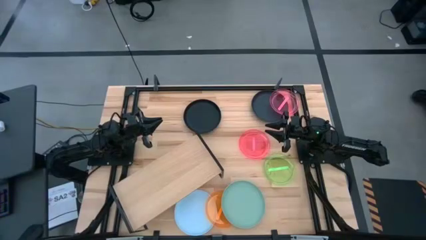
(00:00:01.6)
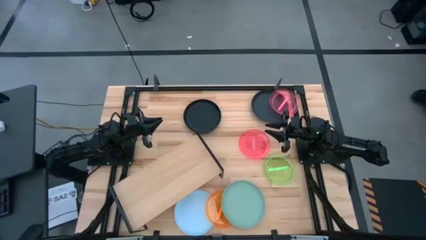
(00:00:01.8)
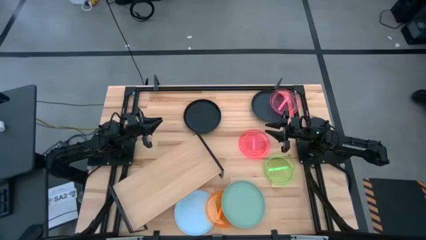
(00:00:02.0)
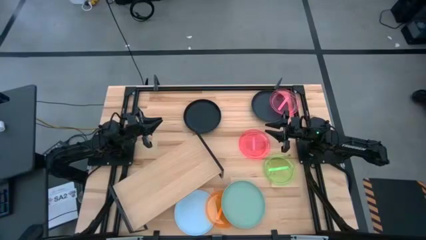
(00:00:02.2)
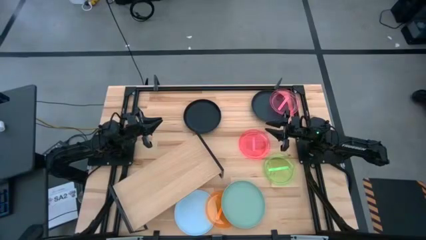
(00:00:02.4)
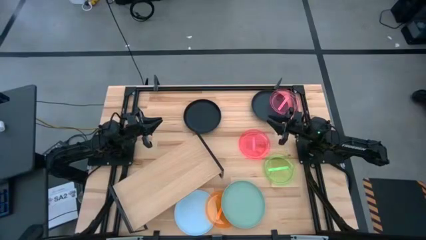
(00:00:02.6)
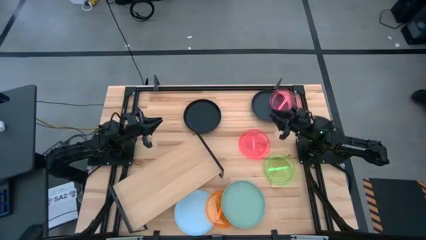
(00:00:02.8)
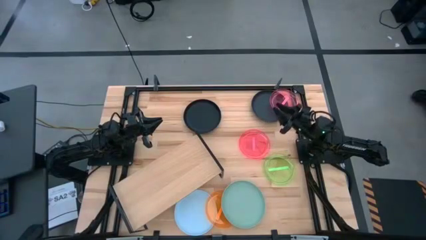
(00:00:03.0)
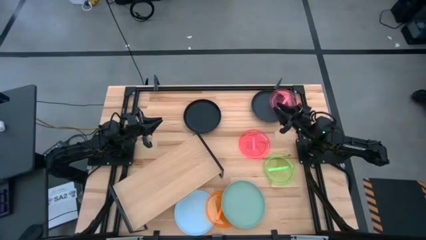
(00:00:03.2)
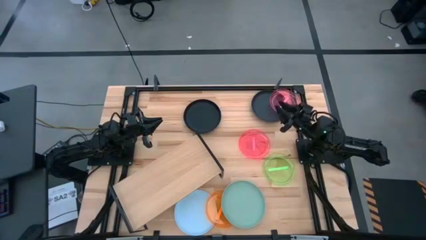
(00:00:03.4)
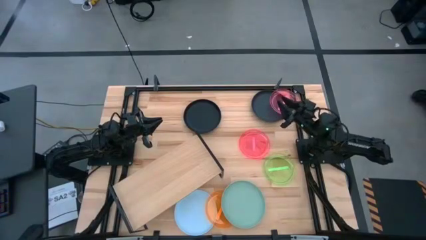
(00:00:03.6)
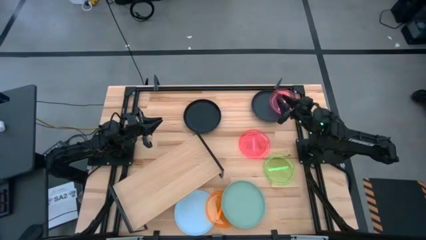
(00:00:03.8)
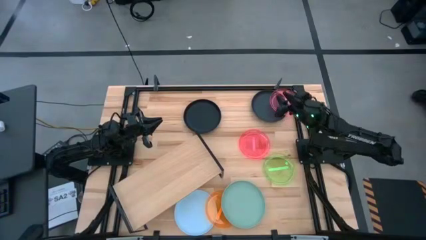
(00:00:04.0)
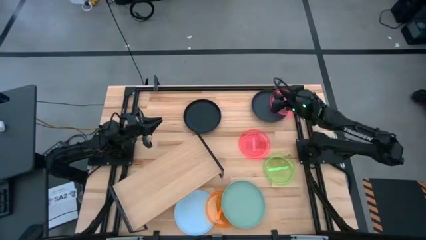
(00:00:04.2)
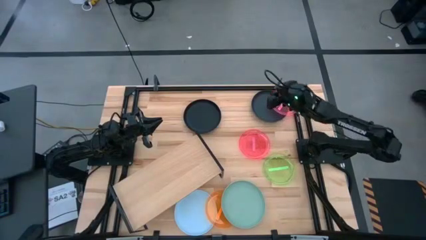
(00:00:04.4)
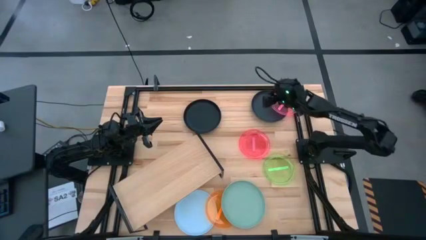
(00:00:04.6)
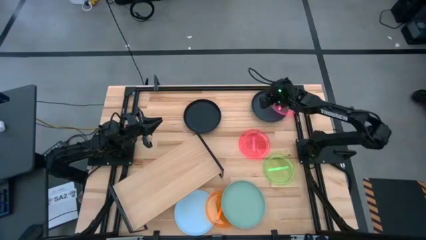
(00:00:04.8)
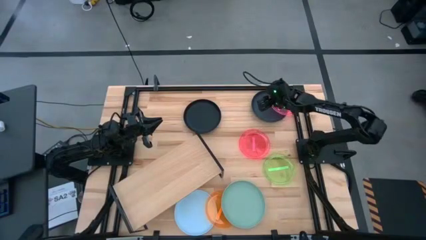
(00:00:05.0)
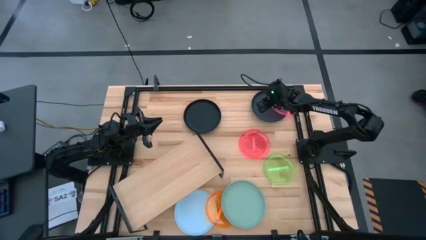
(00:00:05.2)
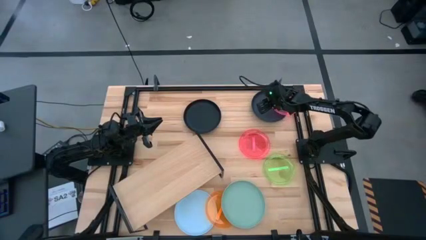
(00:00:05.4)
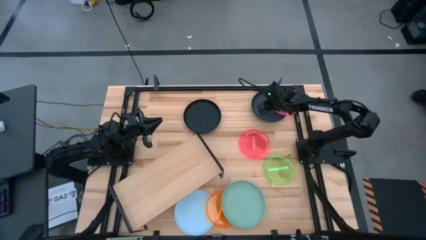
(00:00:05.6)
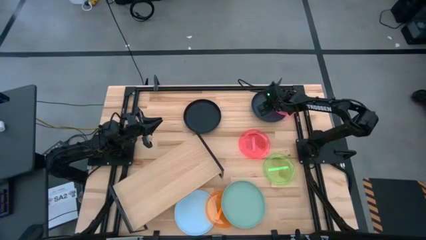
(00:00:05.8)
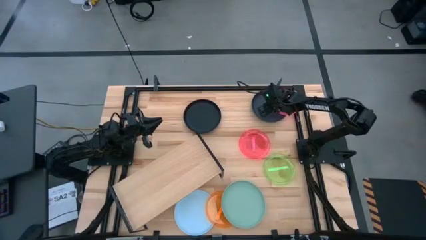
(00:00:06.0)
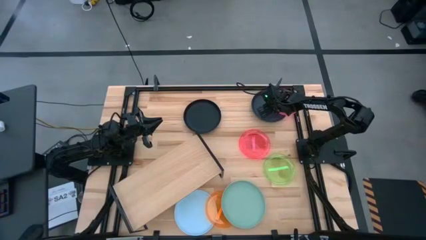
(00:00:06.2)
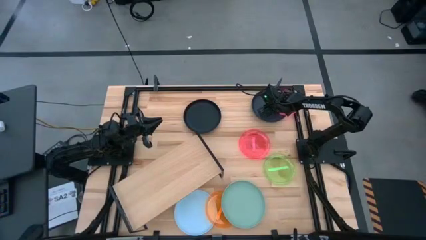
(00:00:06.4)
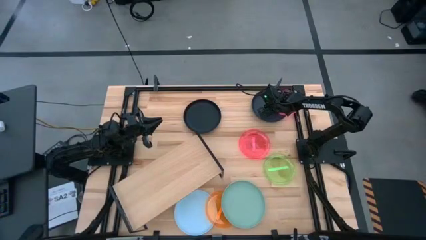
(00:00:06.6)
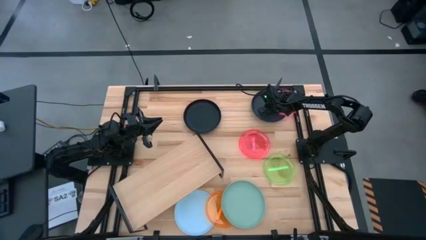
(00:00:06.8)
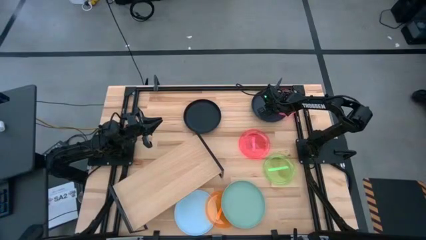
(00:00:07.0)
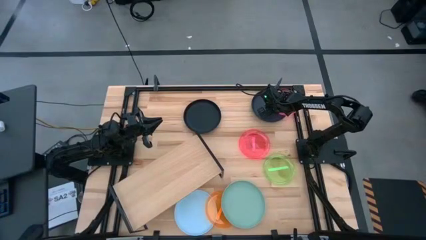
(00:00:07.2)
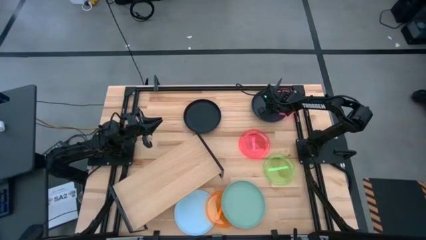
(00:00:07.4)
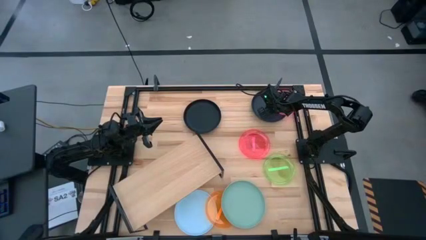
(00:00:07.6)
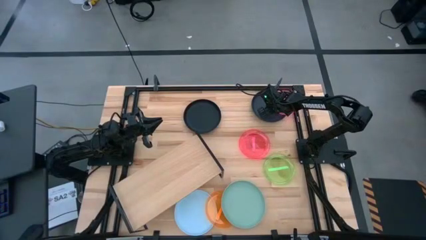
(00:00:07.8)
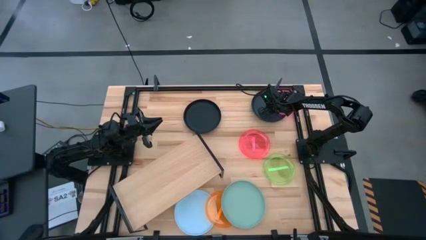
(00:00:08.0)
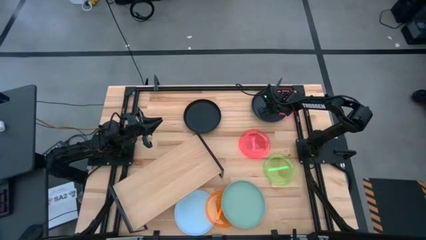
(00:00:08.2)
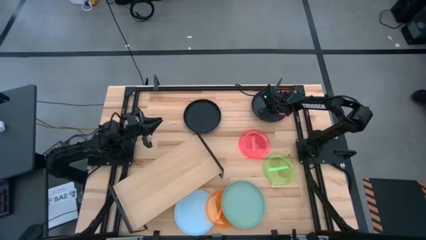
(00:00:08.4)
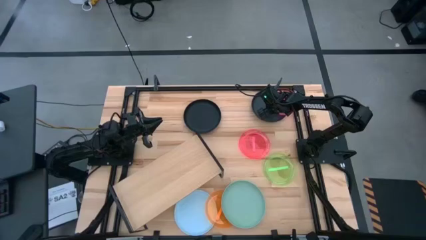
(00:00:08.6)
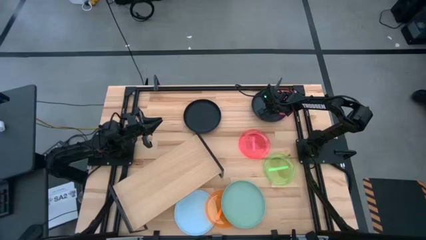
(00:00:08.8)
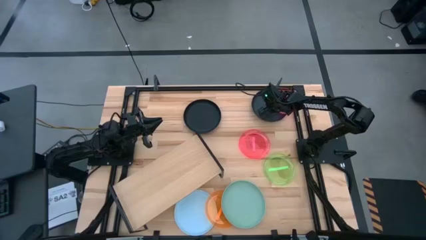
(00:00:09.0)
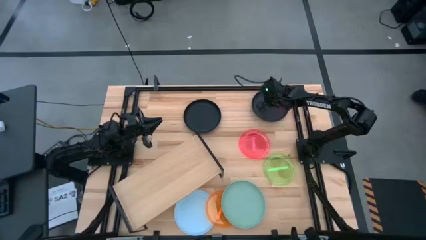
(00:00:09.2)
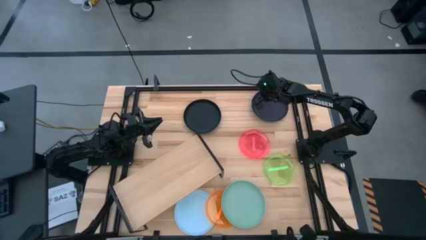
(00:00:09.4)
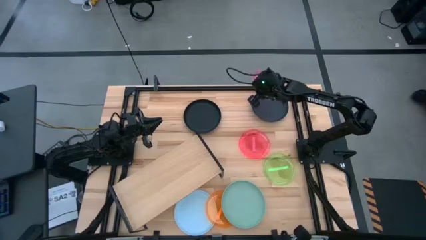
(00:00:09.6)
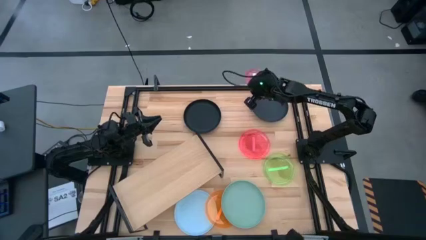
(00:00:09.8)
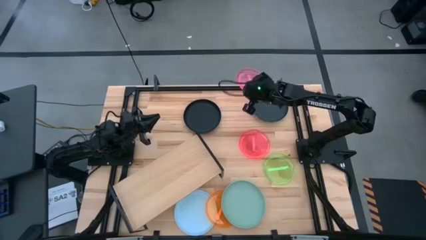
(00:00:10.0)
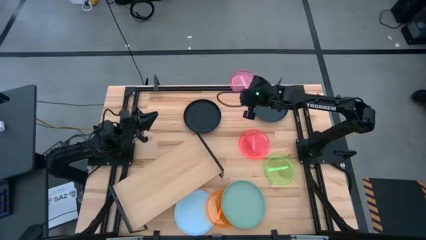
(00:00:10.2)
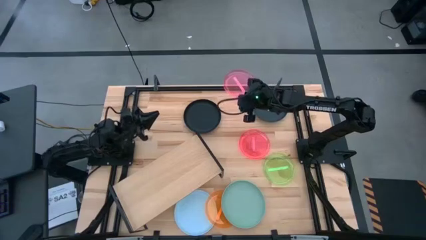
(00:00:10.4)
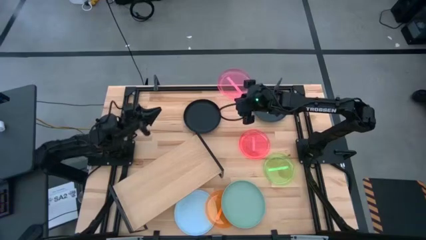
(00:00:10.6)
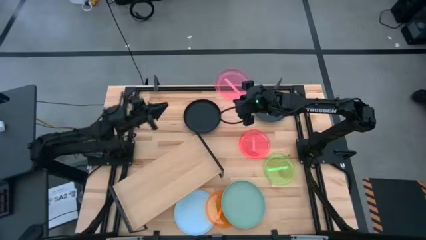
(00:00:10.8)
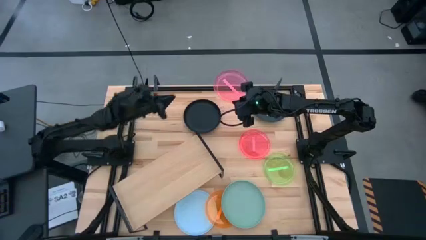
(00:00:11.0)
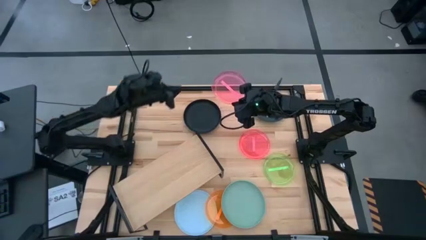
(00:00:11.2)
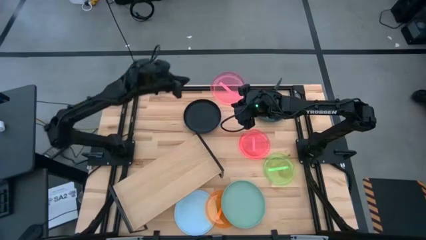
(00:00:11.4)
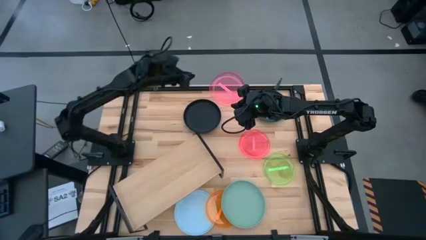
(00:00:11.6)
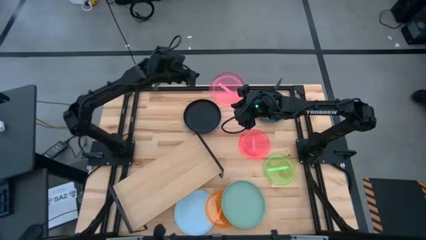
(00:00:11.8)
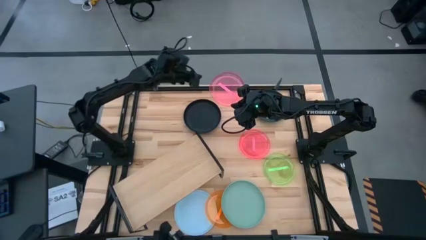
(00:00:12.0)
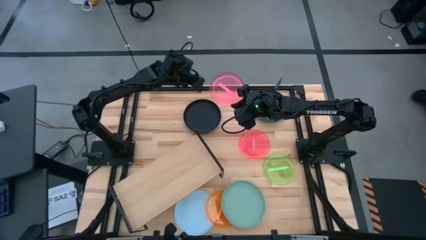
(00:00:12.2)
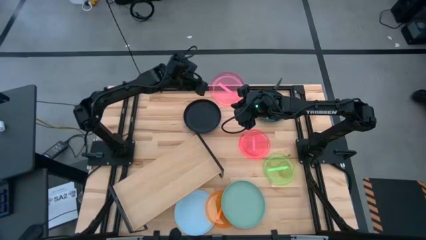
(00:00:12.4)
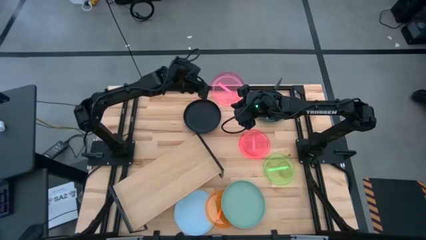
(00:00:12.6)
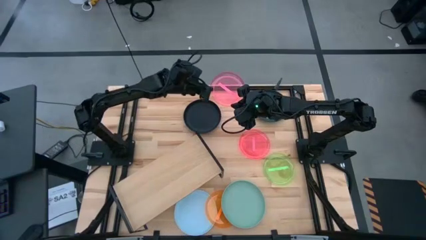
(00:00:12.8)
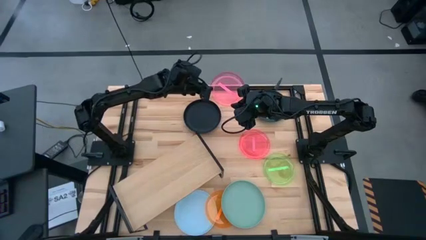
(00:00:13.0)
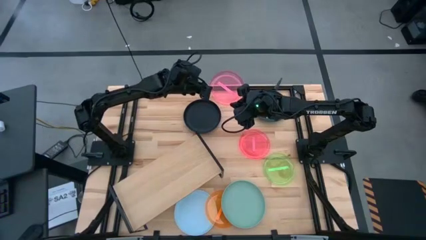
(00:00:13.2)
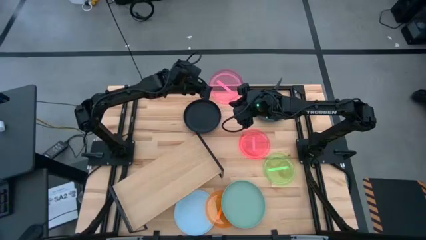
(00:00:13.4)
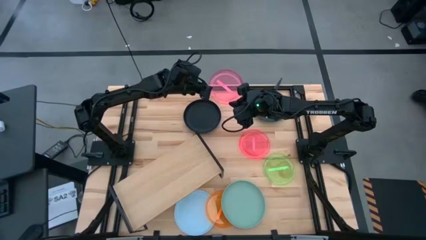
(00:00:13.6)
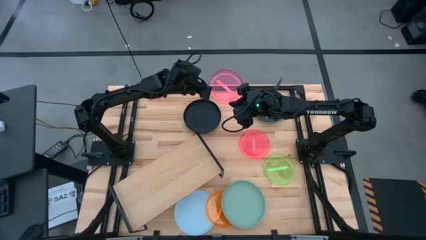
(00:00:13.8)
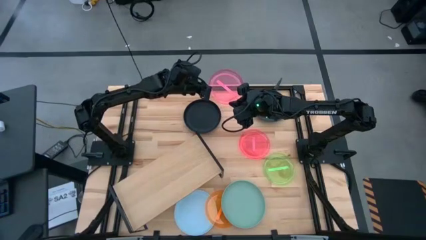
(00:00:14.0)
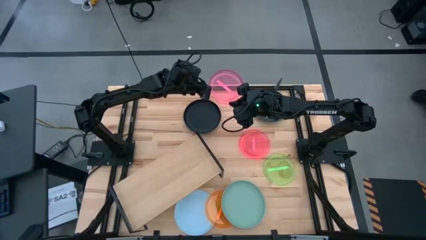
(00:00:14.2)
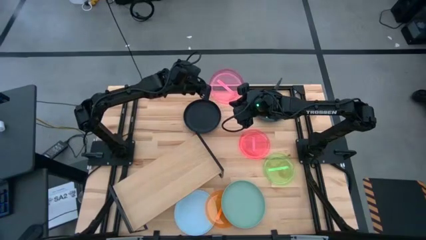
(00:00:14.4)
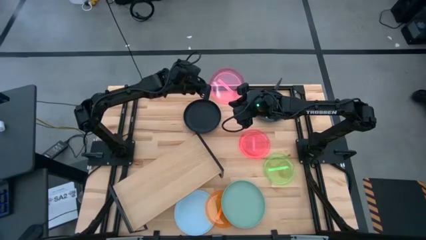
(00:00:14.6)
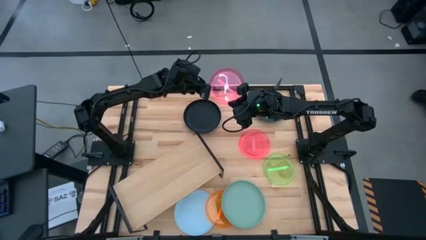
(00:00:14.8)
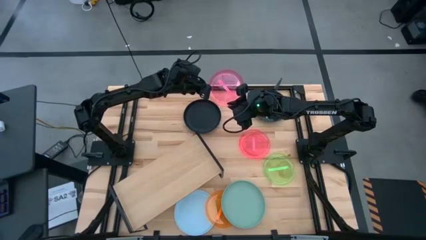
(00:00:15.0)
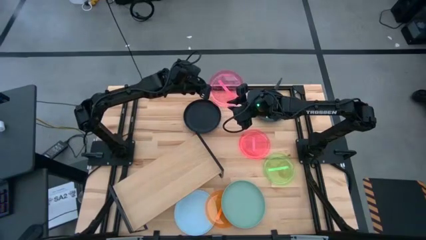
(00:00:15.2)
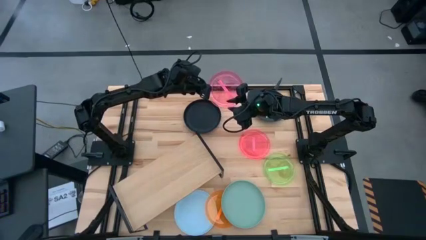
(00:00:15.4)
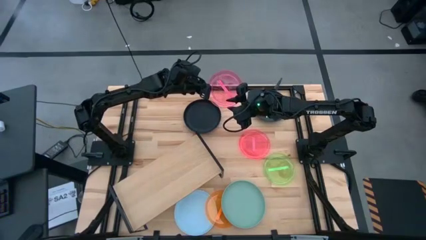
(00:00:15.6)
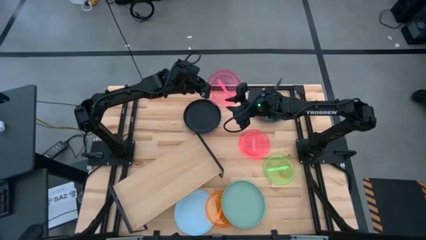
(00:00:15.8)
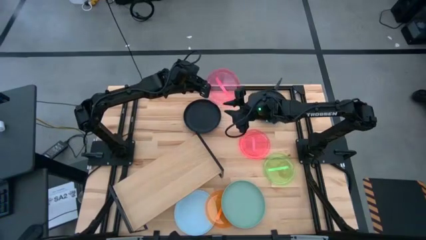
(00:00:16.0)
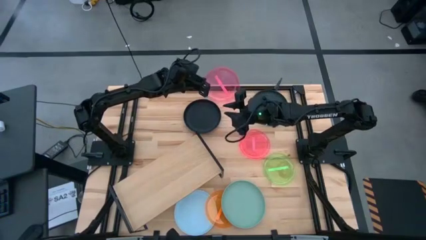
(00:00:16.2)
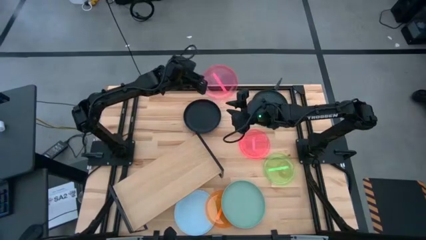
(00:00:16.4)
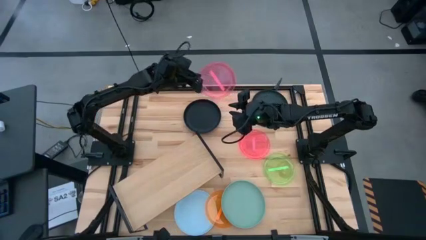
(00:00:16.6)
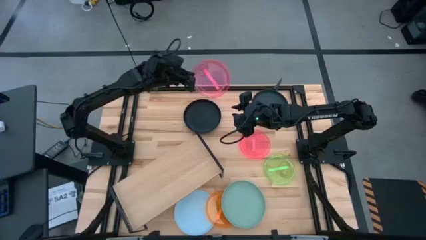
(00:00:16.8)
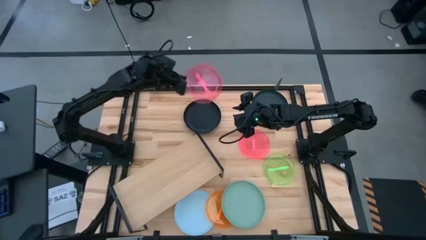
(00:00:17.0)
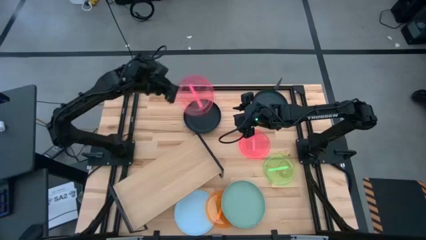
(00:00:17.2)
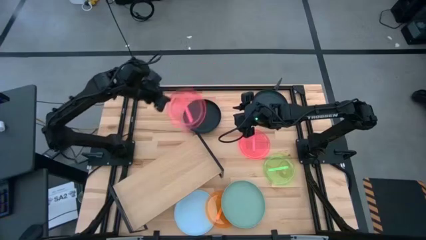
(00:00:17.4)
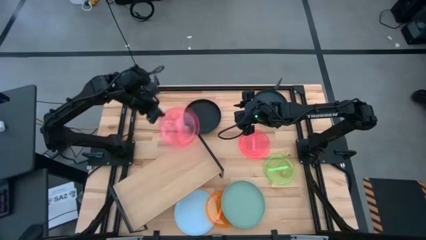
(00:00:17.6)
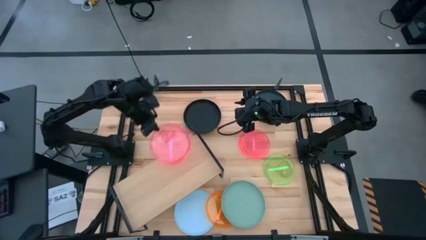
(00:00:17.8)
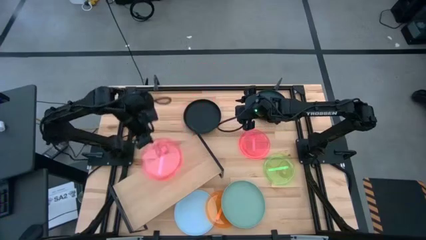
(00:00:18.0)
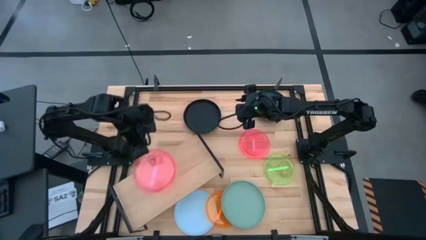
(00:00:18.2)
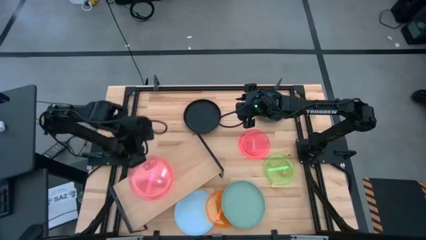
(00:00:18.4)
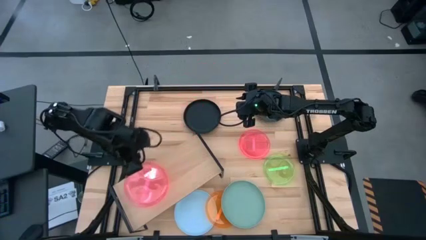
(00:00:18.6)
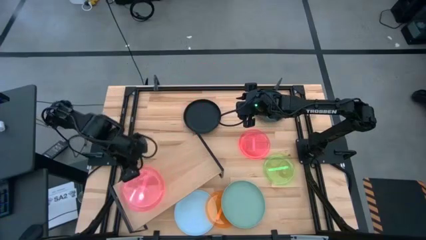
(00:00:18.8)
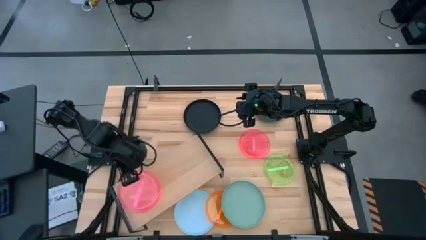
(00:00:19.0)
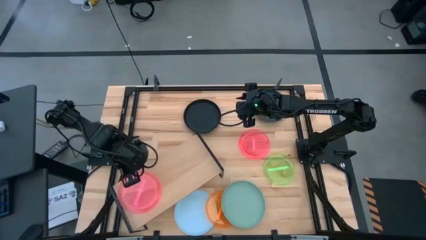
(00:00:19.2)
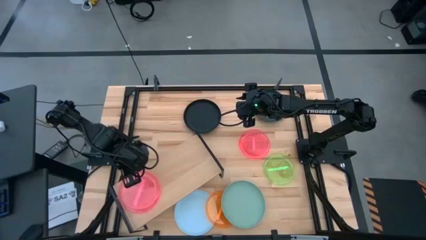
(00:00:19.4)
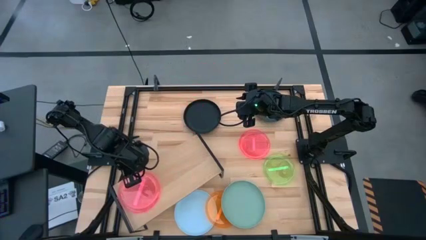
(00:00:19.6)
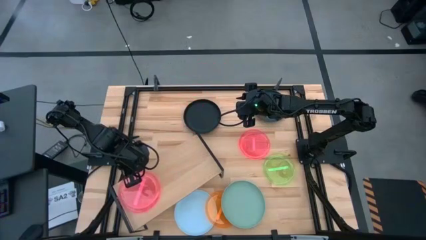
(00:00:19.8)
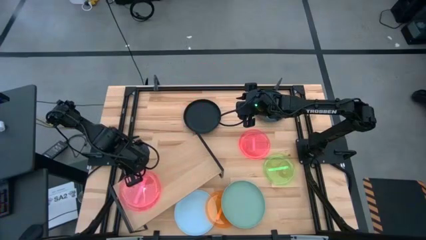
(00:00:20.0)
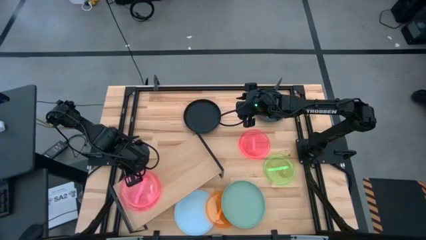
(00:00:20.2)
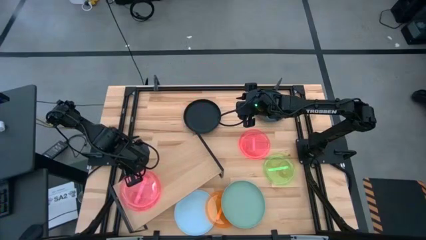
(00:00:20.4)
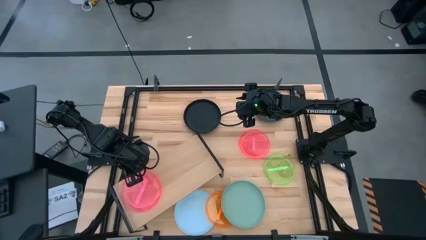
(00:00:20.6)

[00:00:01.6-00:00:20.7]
Task: Place and stack plates onto a shelf
Put the top pink plate on the shelf
